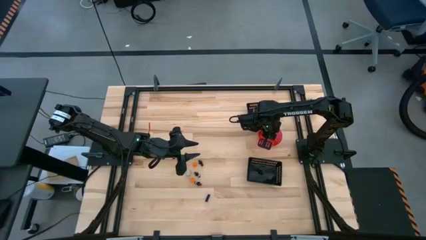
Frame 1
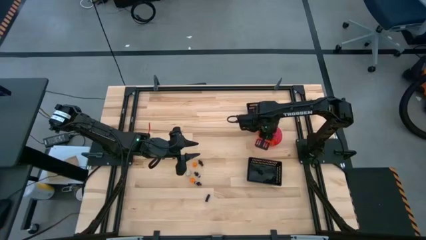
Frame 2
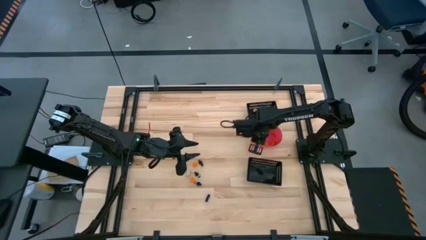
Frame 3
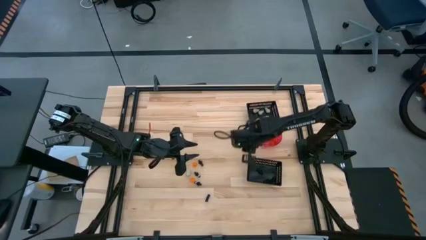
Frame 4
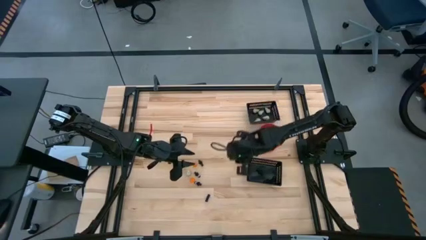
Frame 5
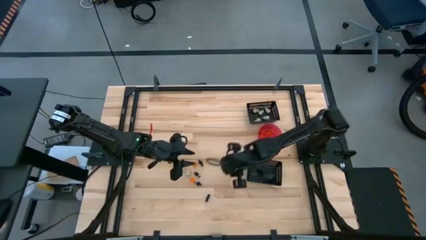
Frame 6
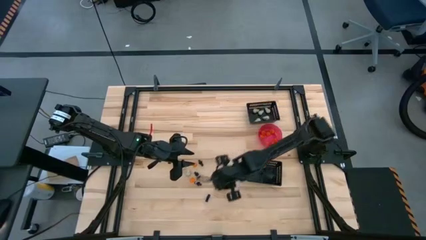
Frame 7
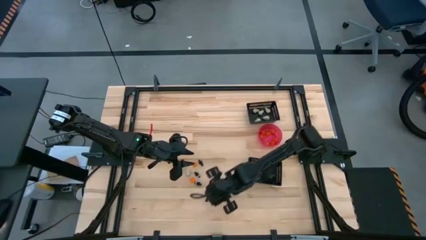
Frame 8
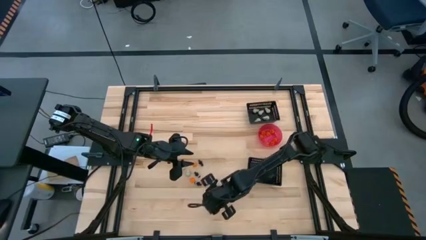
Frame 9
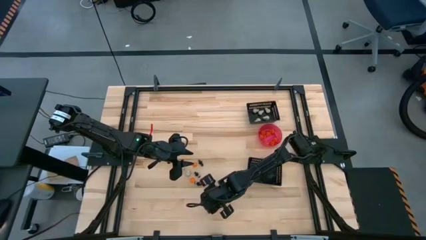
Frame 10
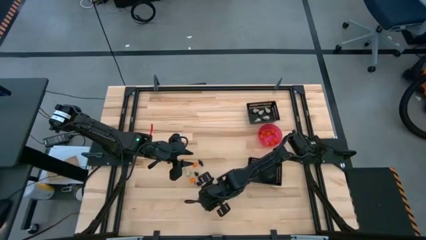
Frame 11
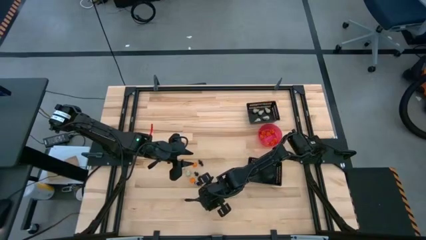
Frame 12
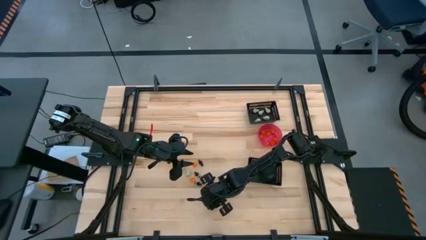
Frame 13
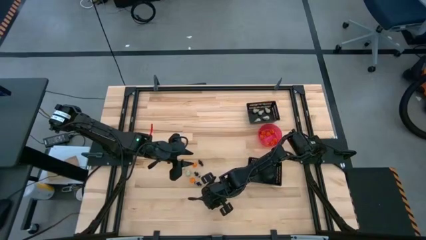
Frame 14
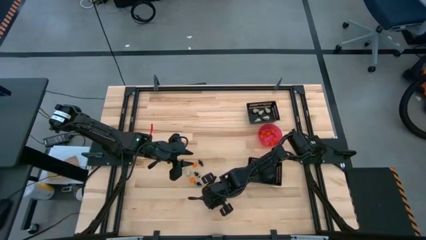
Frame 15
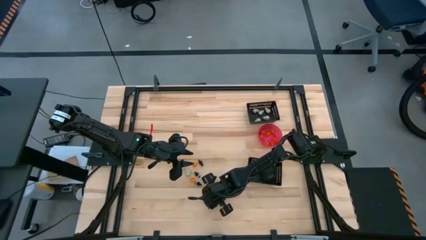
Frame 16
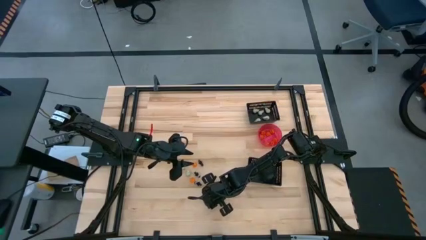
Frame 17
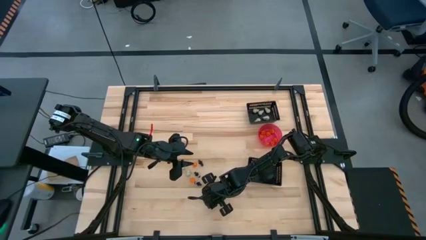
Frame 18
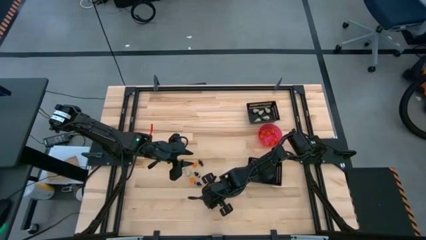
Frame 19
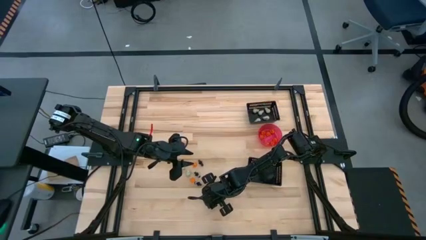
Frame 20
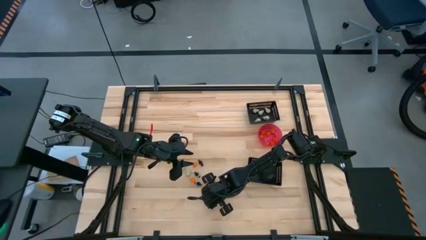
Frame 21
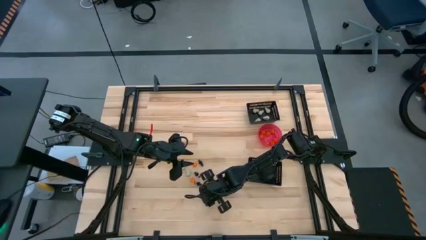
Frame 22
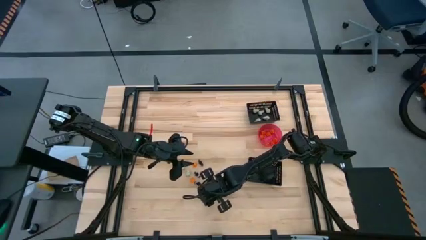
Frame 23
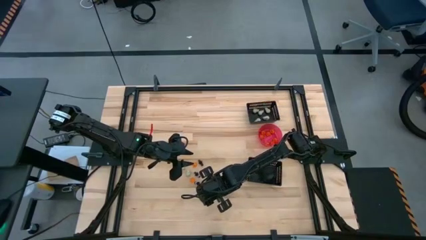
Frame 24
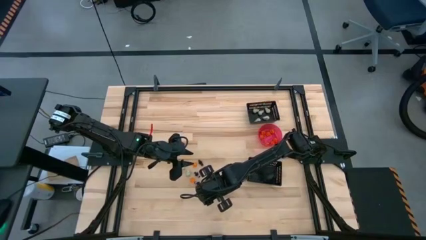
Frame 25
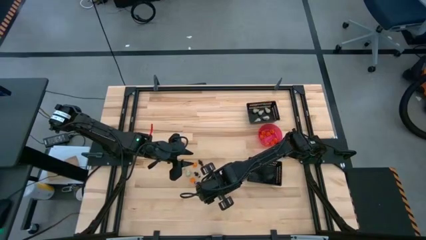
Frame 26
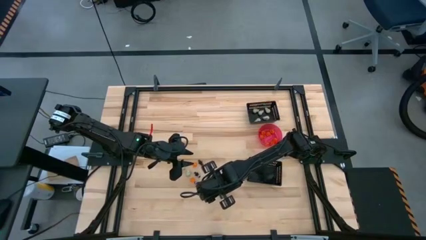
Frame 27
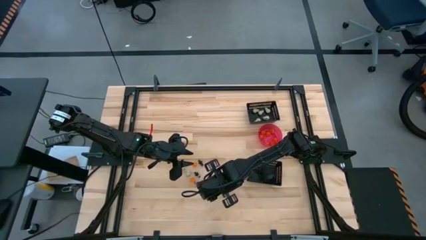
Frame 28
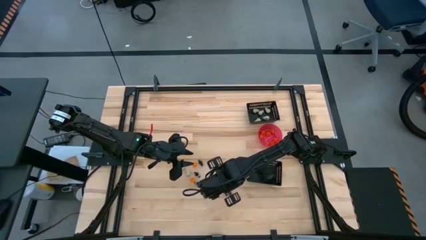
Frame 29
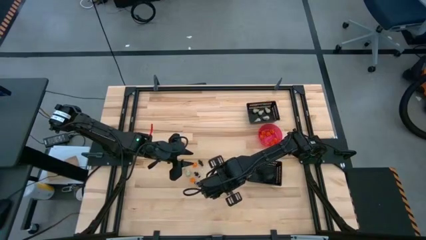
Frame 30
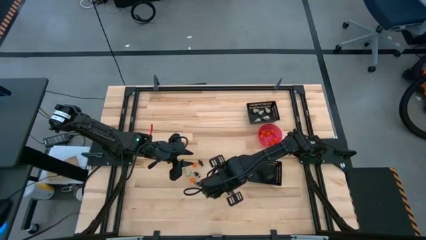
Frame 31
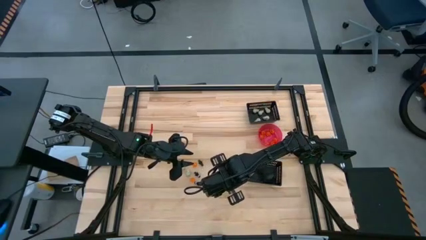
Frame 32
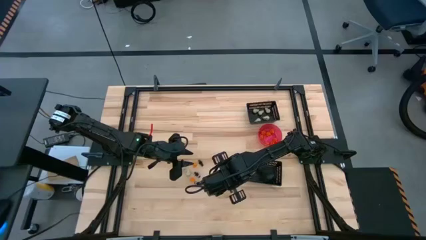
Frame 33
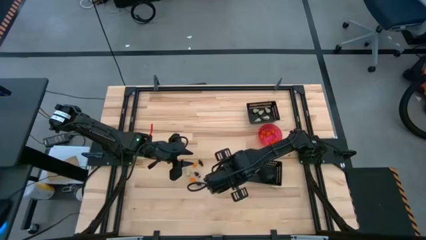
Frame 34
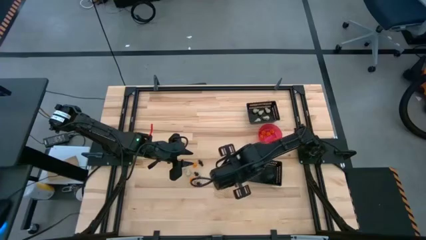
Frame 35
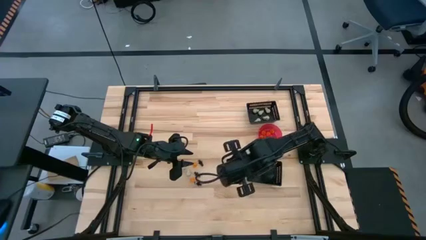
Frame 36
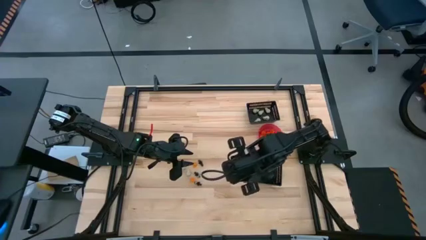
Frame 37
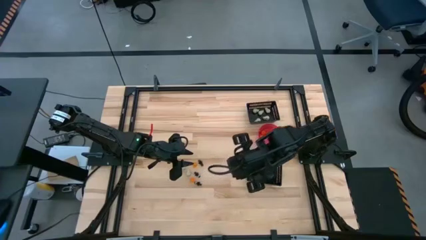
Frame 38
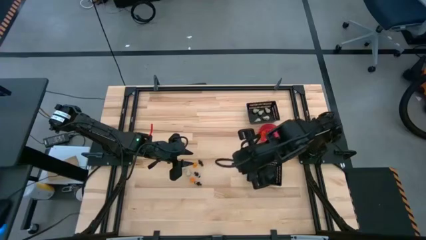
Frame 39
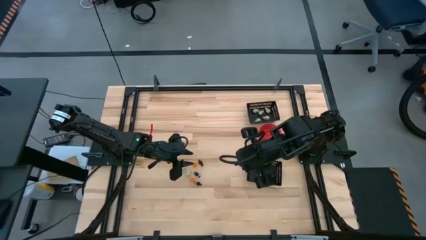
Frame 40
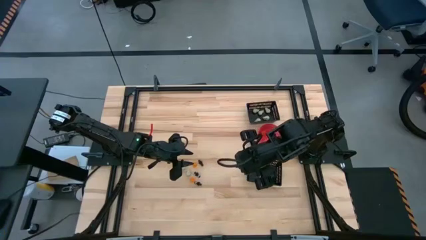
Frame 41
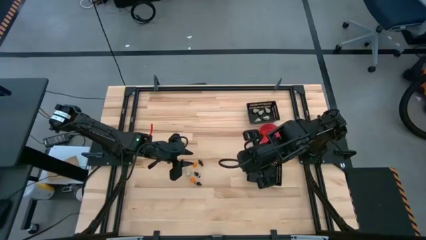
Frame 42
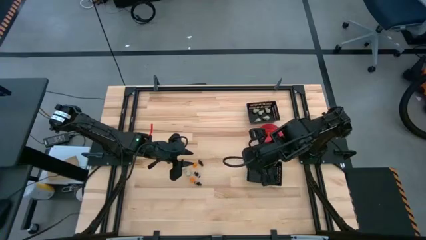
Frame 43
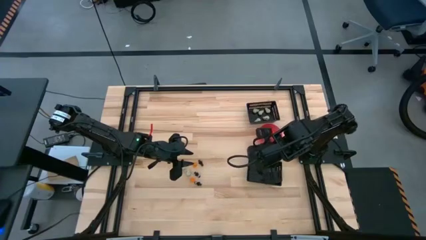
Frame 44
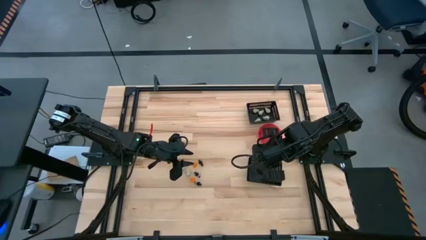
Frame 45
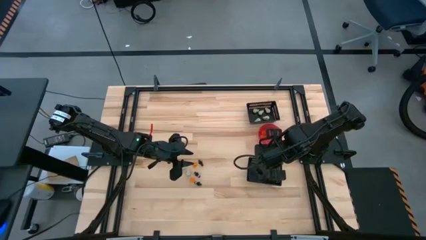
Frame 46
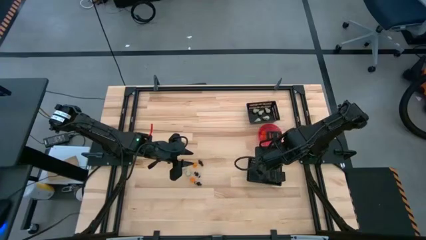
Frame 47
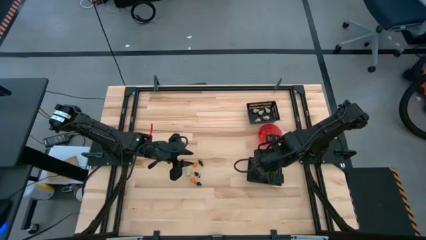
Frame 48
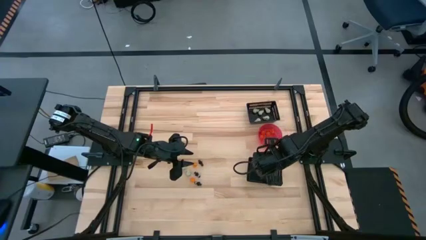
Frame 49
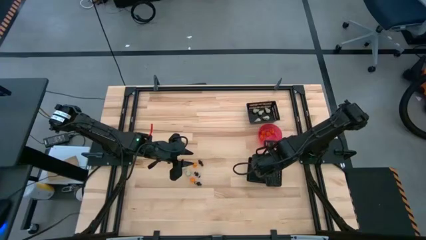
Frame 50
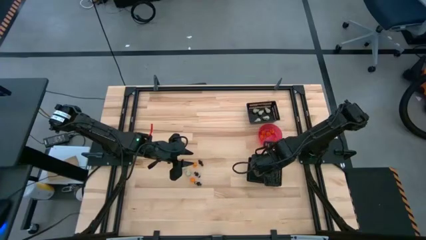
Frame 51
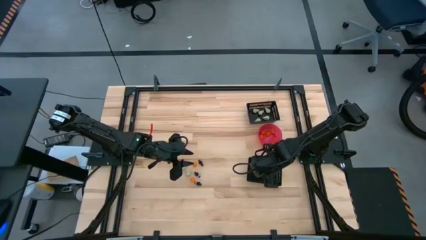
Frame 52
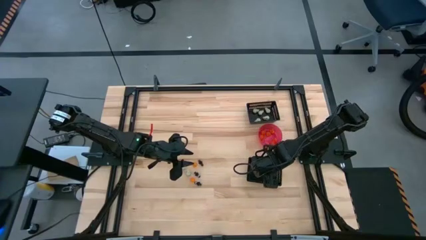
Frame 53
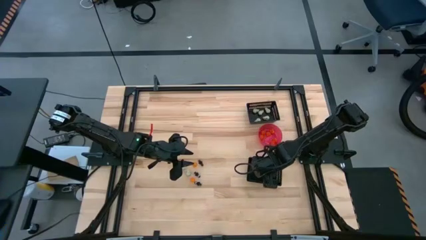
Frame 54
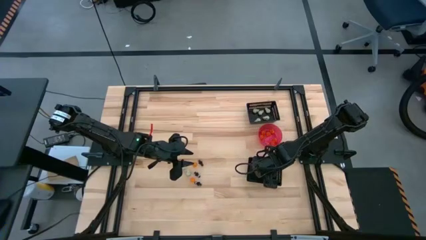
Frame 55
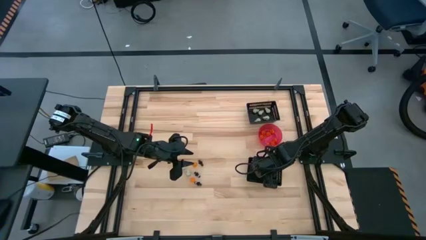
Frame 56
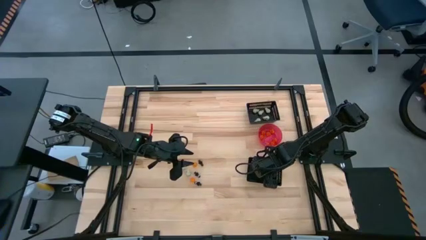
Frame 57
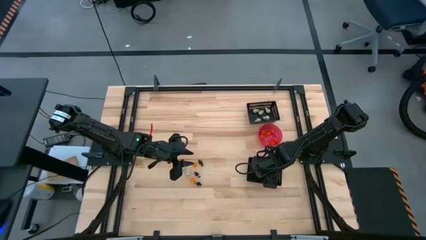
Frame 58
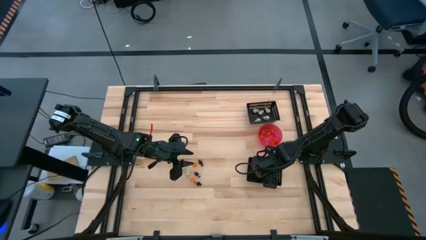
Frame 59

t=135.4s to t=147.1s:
Task: Sort Halloween decoration
Put the black skeleton toy into the bottom black bin

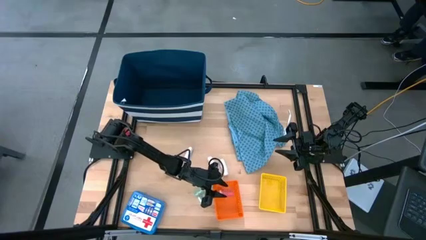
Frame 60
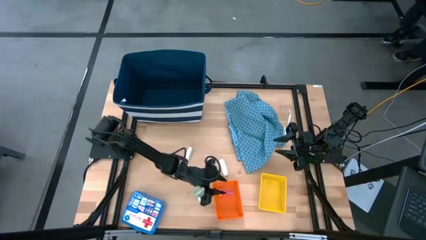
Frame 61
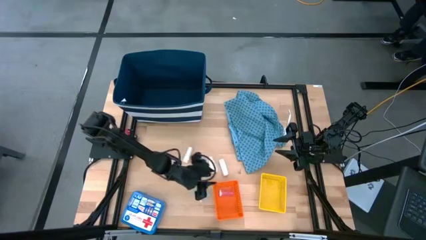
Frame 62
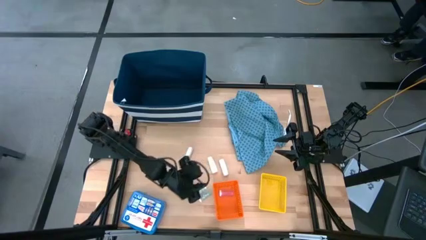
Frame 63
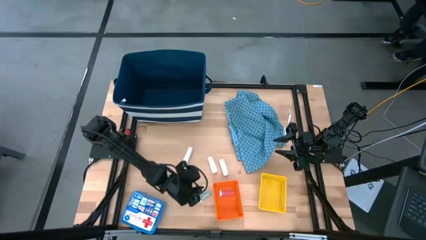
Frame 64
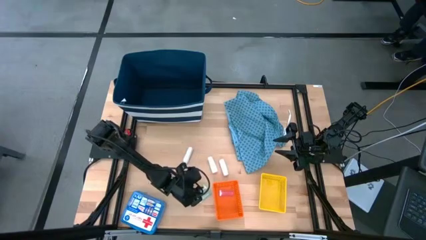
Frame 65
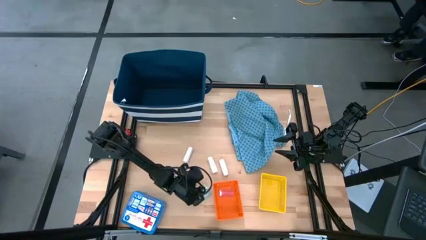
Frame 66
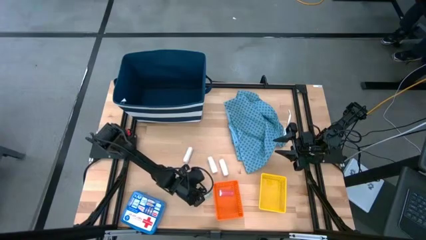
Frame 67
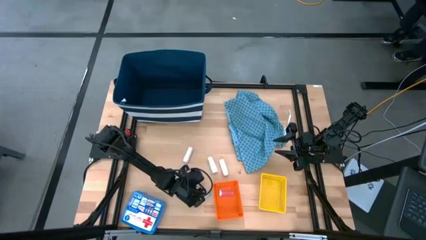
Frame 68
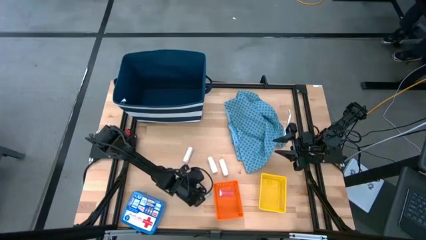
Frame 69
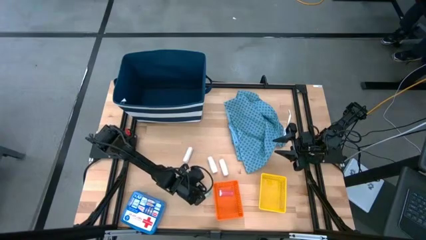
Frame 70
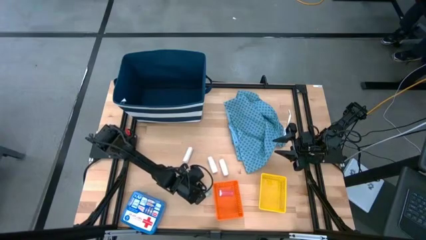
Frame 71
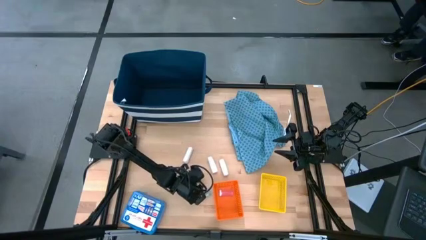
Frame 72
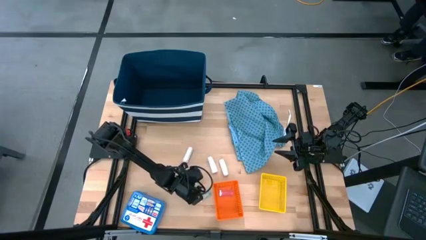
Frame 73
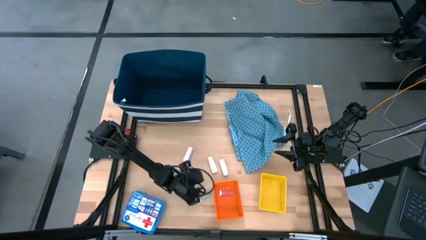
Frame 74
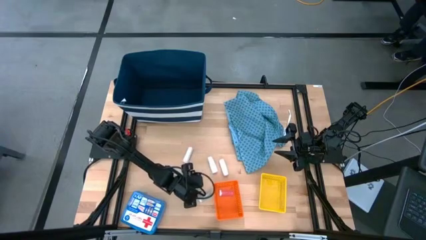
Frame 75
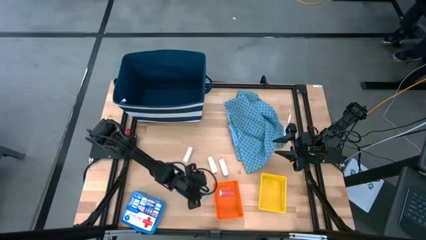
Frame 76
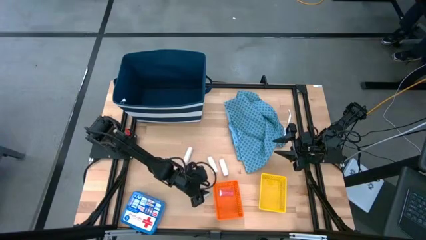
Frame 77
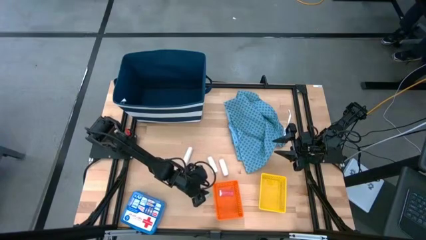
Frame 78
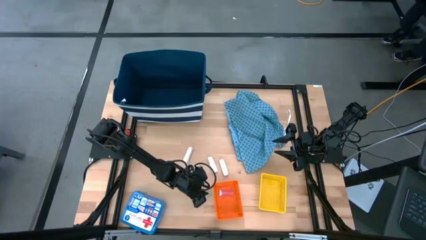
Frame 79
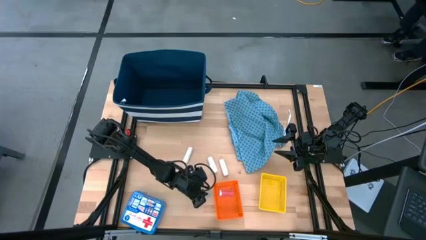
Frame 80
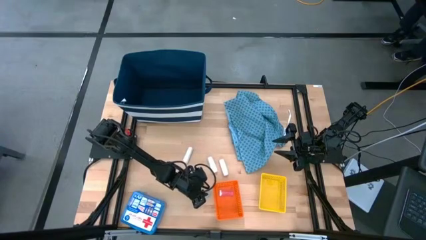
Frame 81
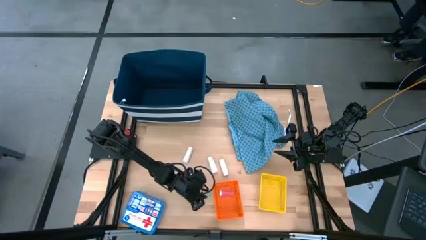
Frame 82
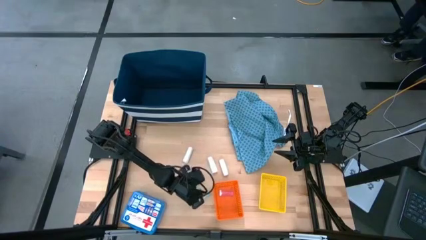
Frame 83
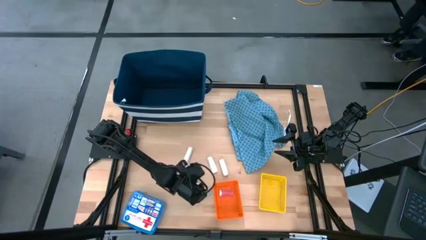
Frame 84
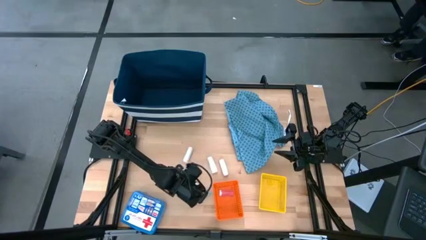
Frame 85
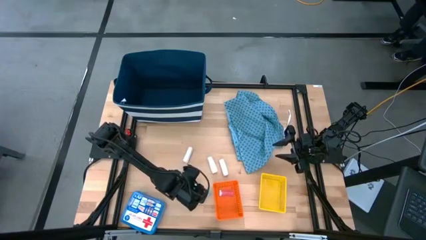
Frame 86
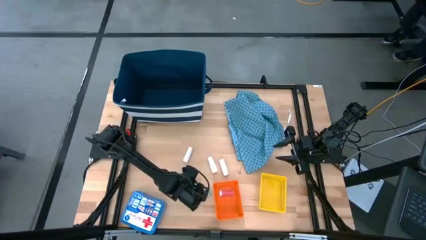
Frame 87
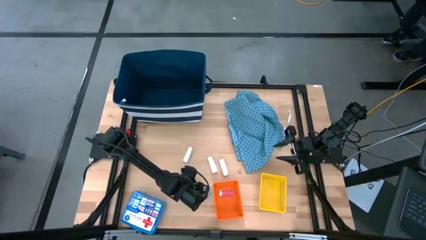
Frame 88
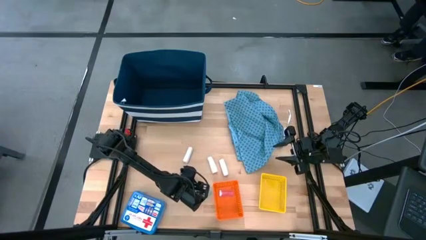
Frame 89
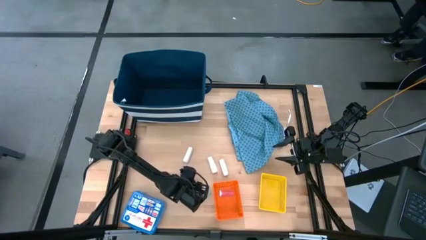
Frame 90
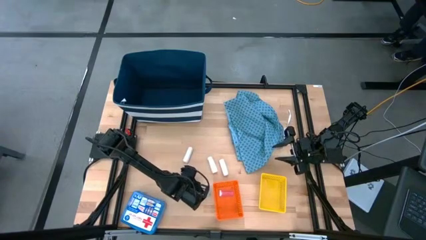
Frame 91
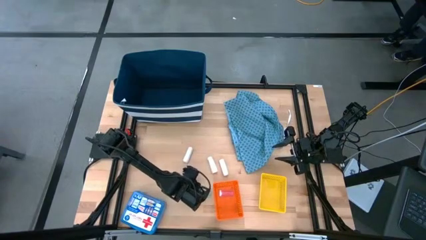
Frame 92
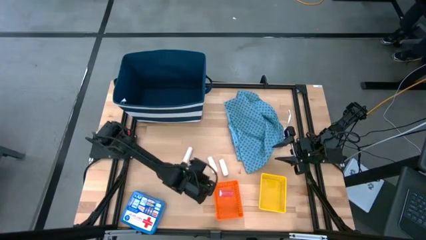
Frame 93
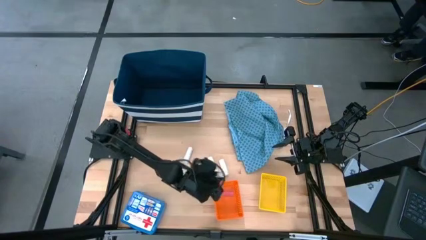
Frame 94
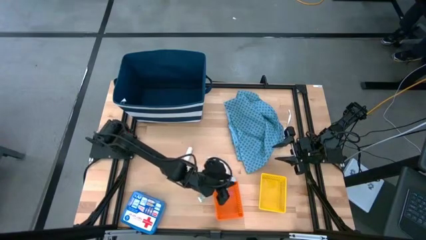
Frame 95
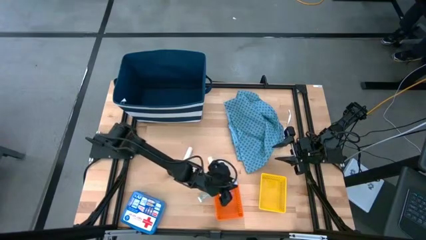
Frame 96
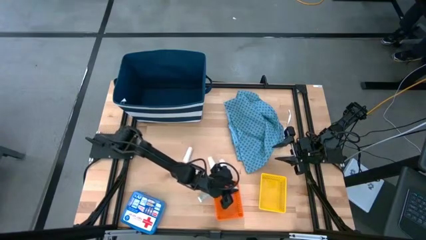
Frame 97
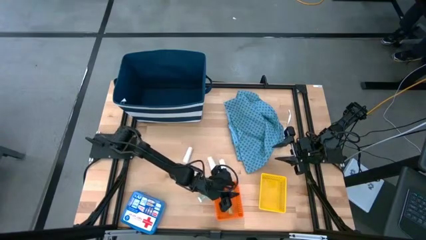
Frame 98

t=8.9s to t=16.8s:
Task: Pick & Place Medicine items
Put the top blue pill bottle into the orange bin
